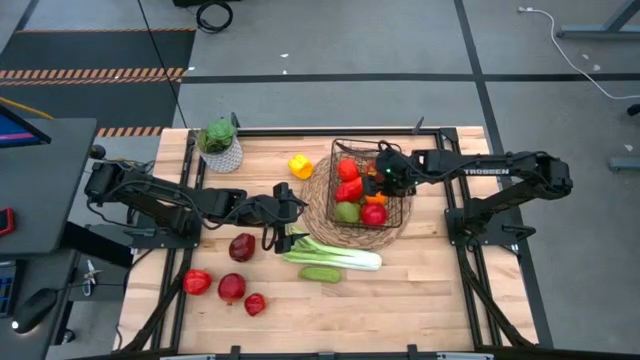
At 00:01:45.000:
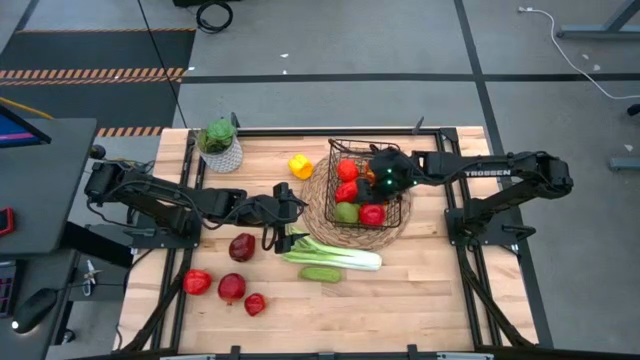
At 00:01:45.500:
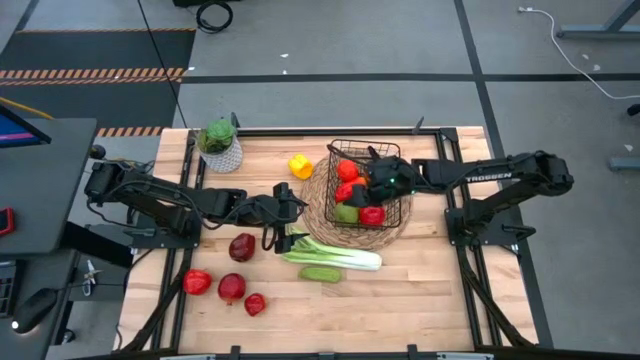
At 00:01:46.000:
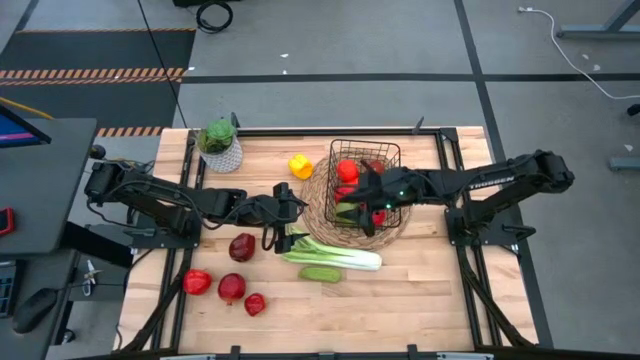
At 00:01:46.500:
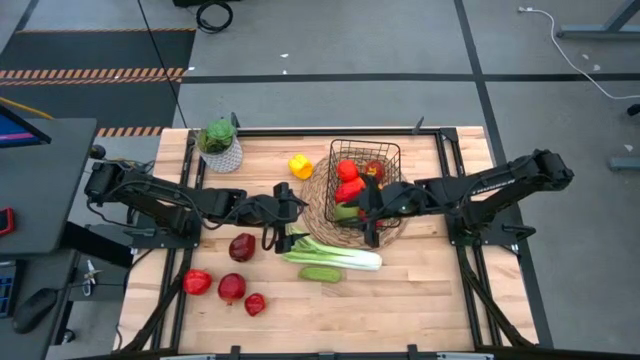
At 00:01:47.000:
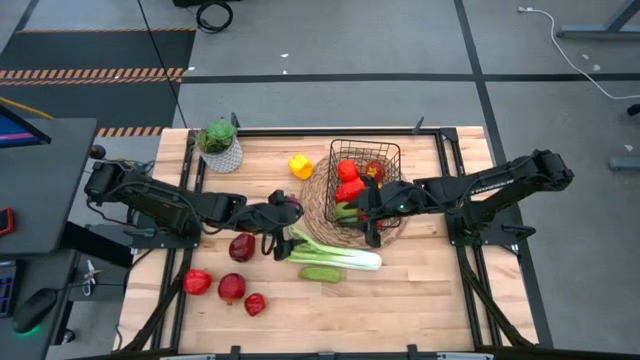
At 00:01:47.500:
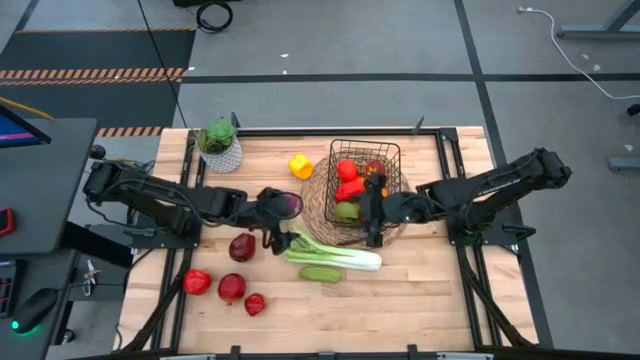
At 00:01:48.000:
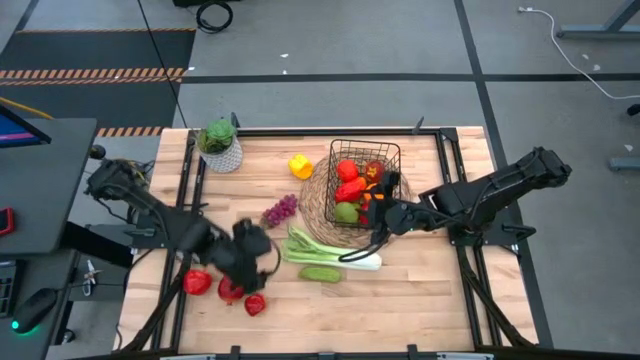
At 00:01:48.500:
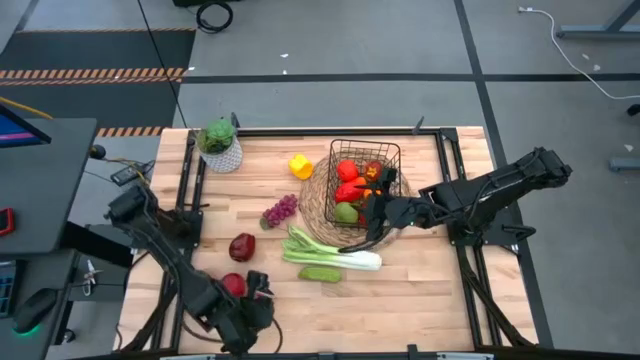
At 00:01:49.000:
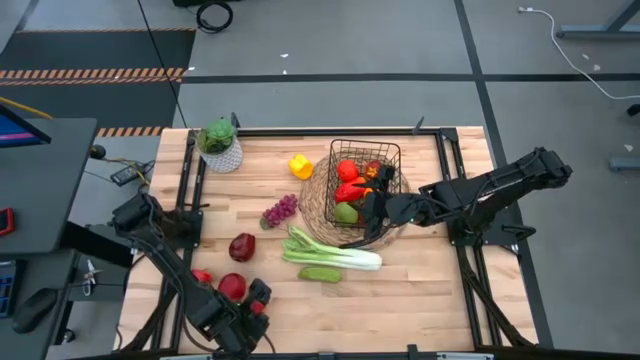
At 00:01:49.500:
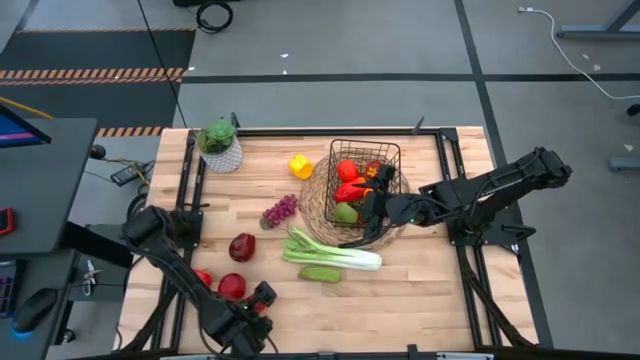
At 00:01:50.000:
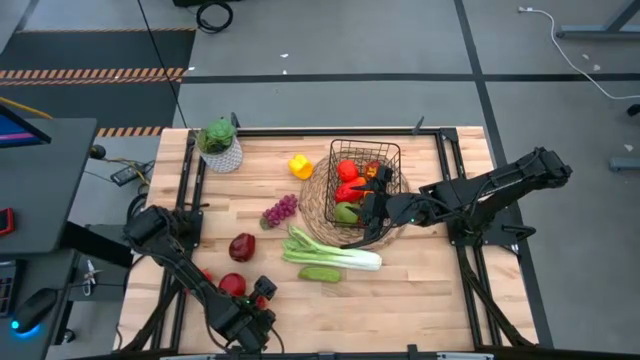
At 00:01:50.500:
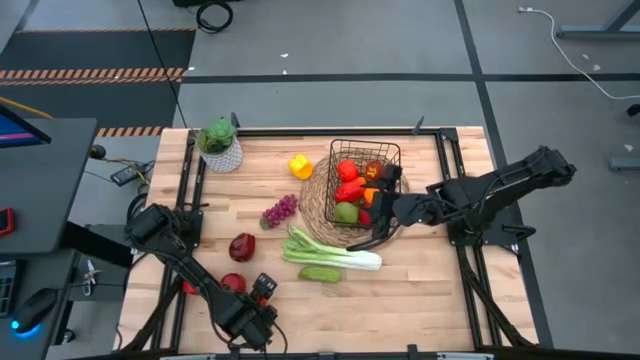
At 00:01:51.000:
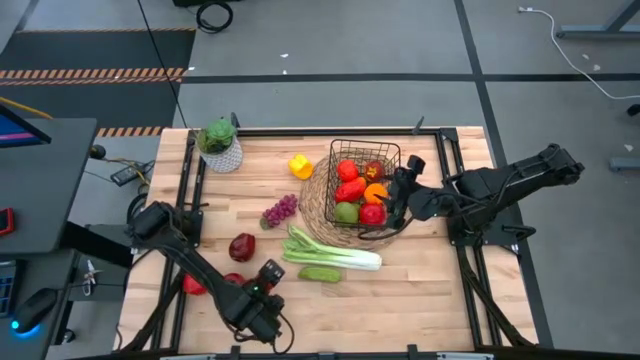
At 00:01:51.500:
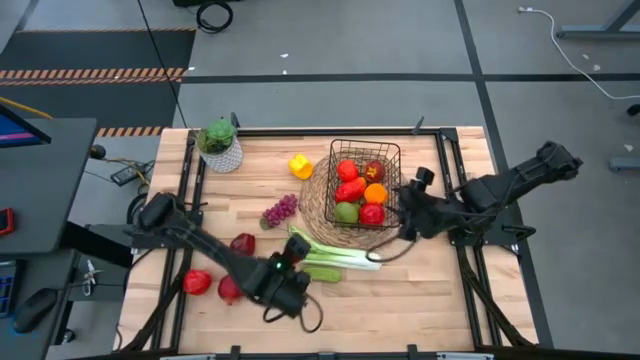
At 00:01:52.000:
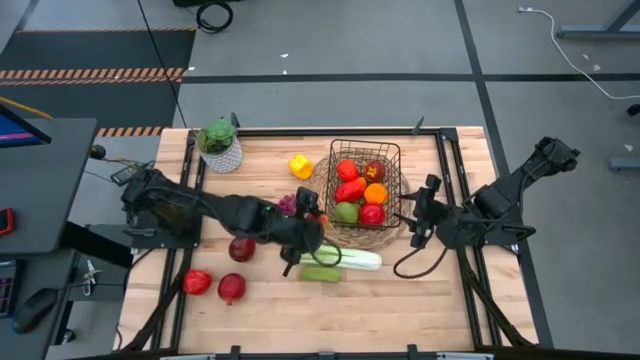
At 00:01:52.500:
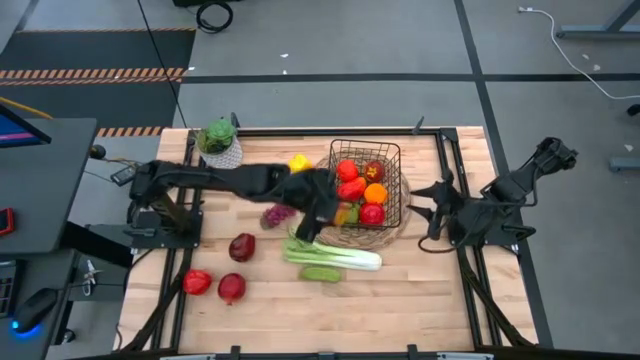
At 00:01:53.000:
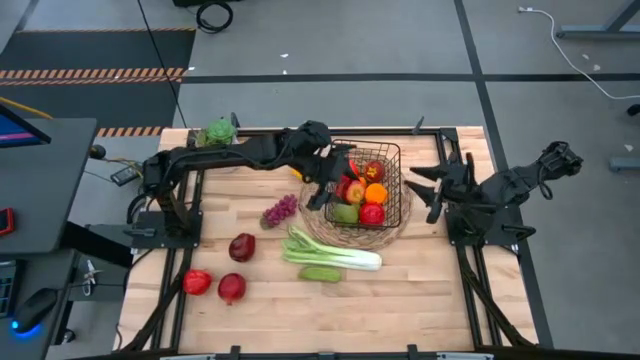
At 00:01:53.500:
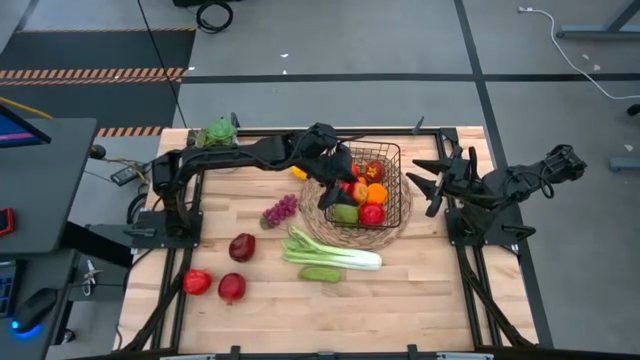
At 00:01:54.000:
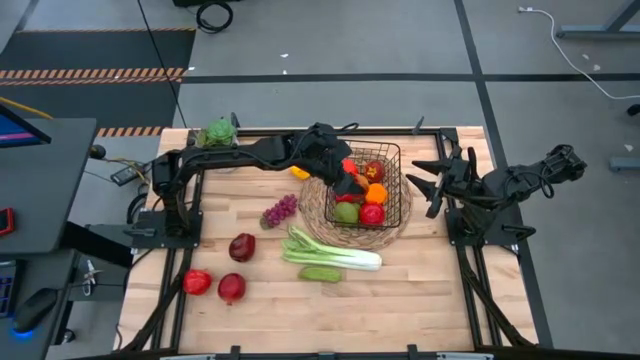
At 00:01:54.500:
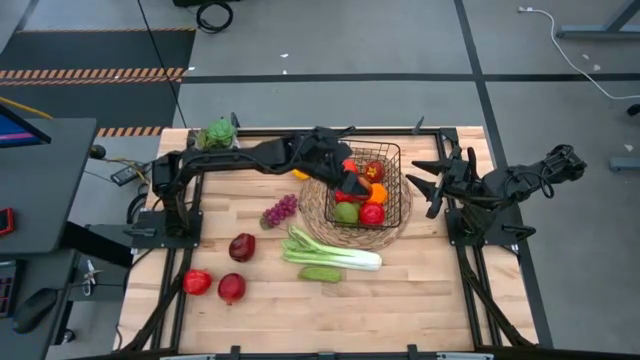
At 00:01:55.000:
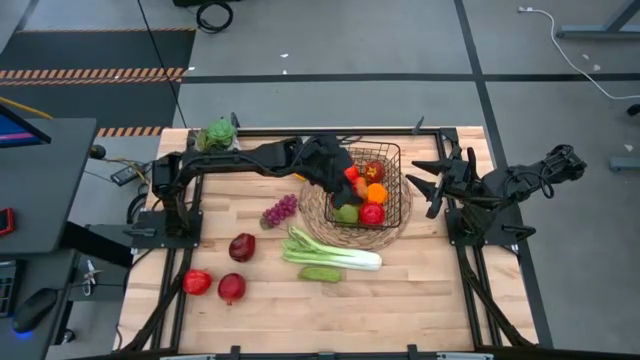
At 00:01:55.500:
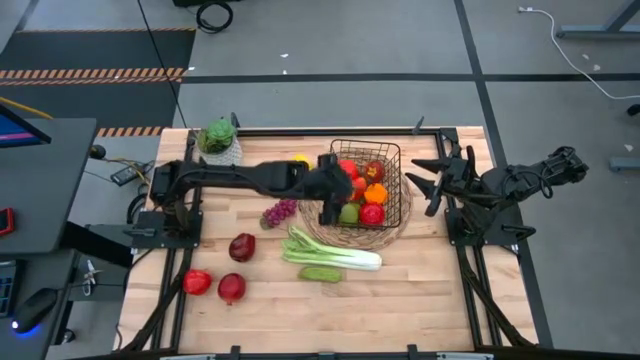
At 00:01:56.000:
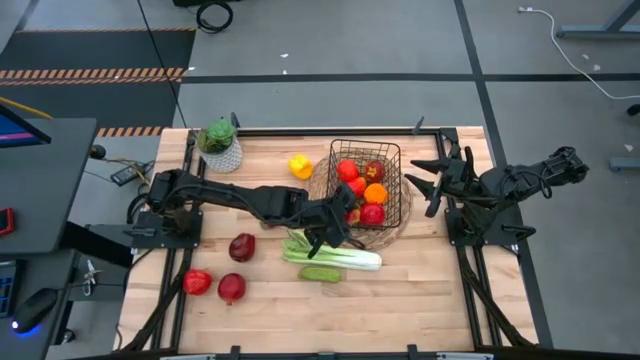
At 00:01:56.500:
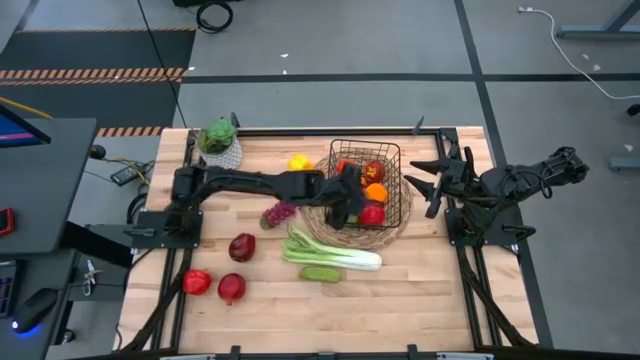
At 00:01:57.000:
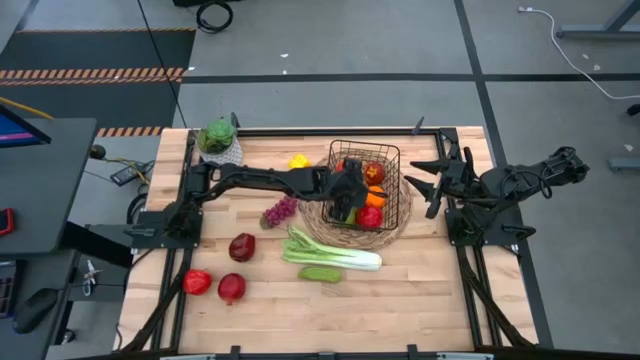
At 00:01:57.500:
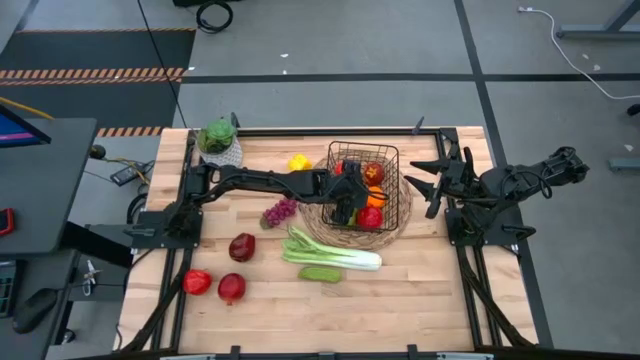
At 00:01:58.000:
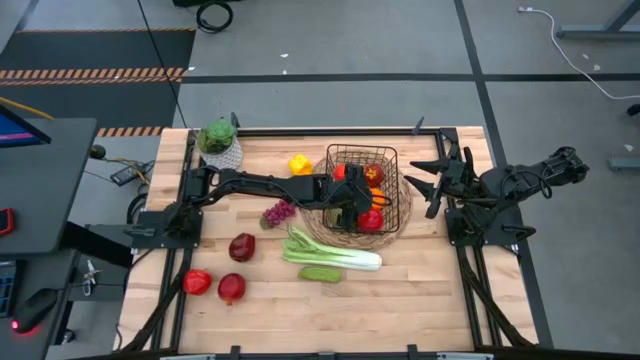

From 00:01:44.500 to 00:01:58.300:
Task: Build produce basket
Put the bottom right apple into the wire basket
